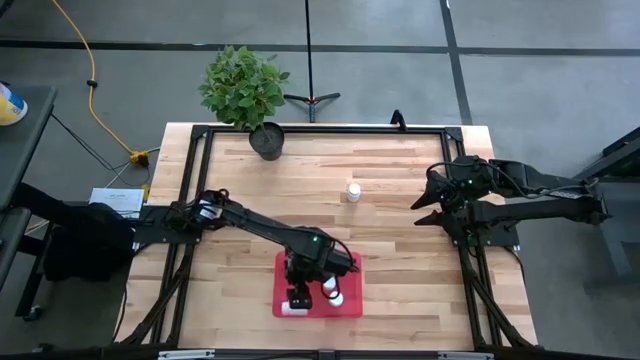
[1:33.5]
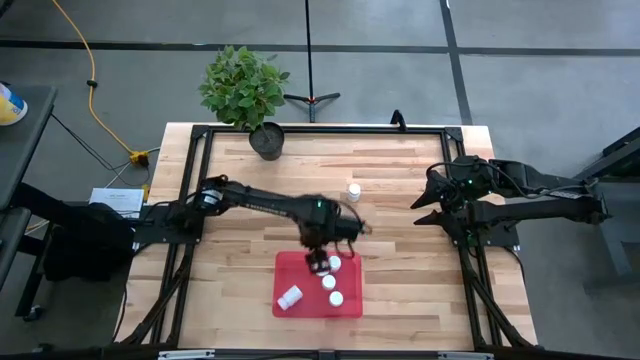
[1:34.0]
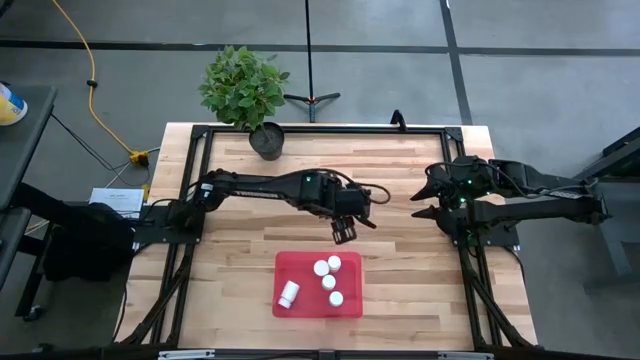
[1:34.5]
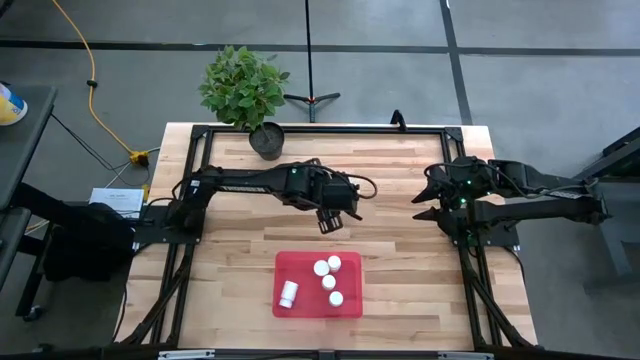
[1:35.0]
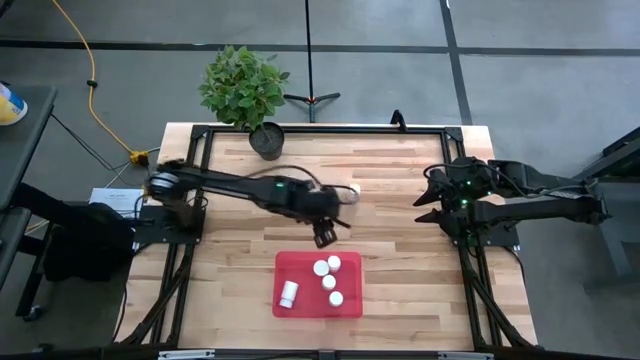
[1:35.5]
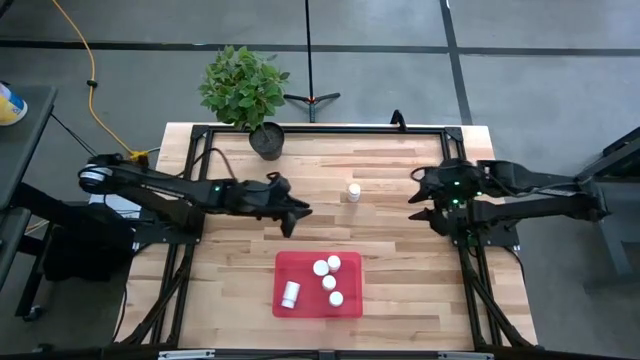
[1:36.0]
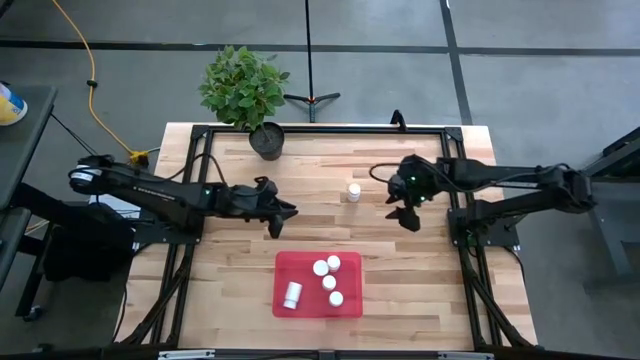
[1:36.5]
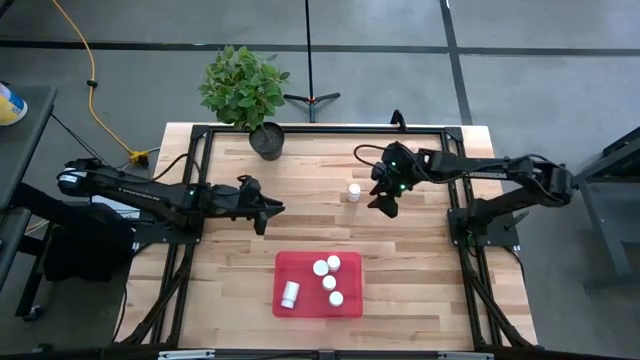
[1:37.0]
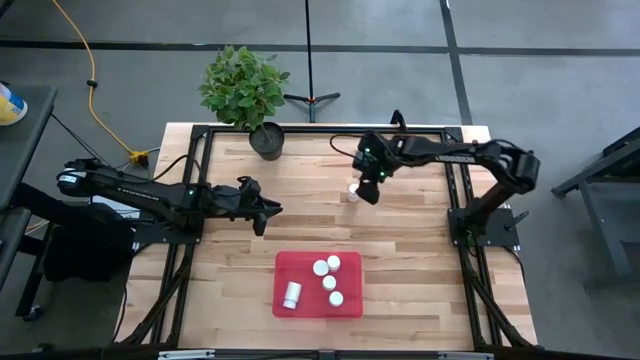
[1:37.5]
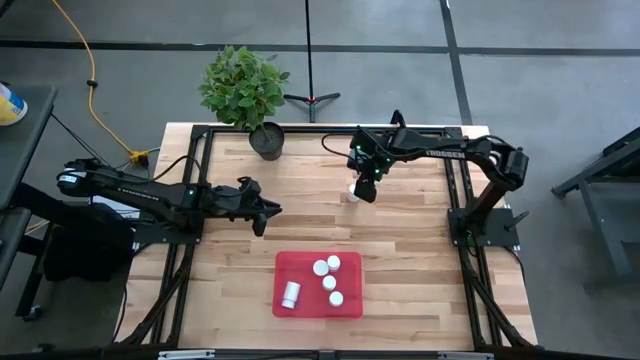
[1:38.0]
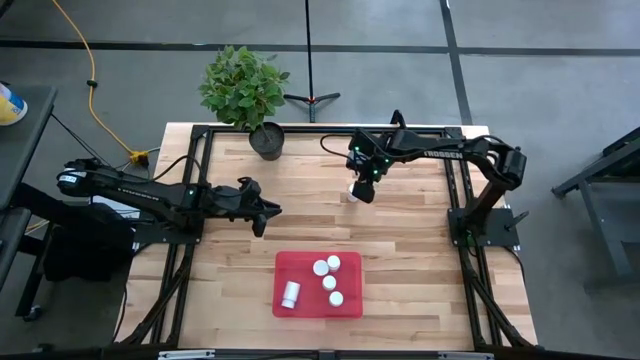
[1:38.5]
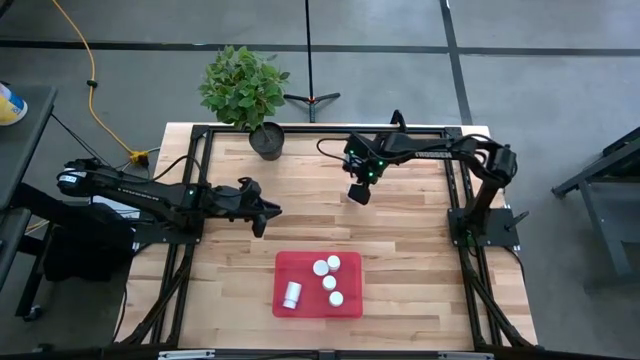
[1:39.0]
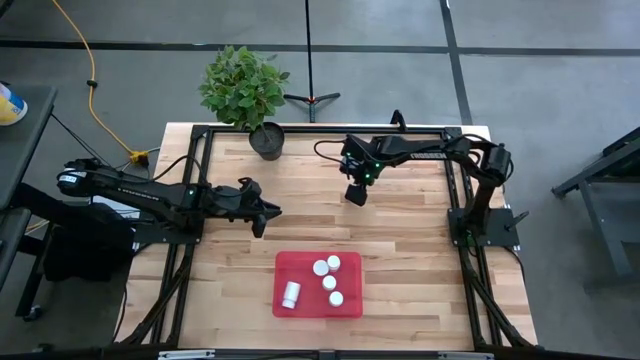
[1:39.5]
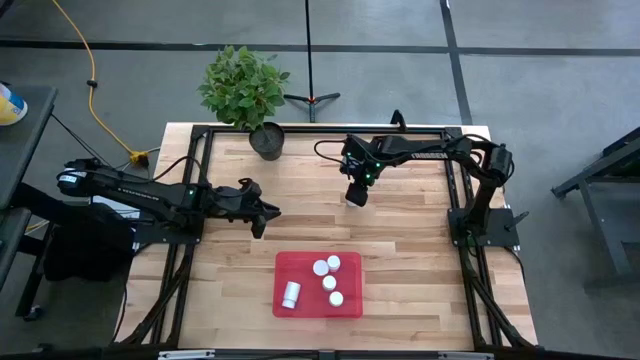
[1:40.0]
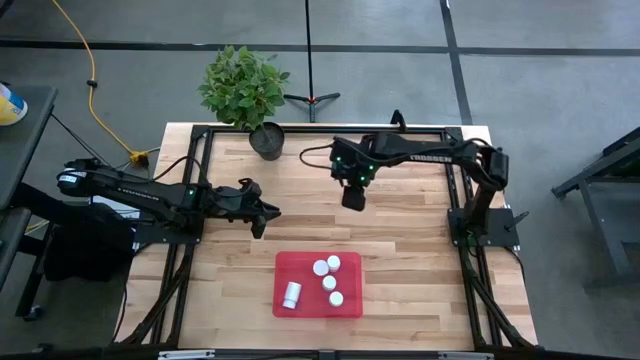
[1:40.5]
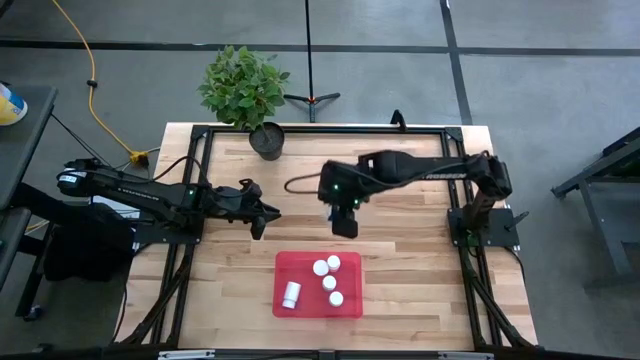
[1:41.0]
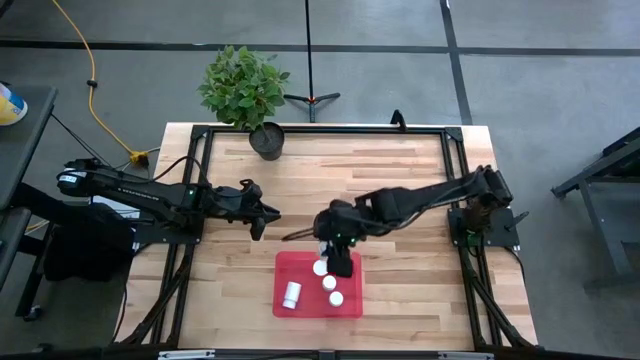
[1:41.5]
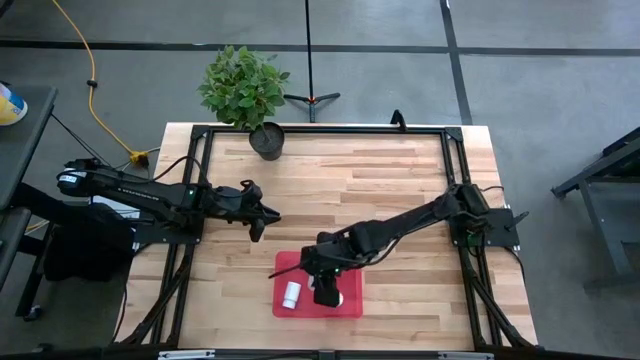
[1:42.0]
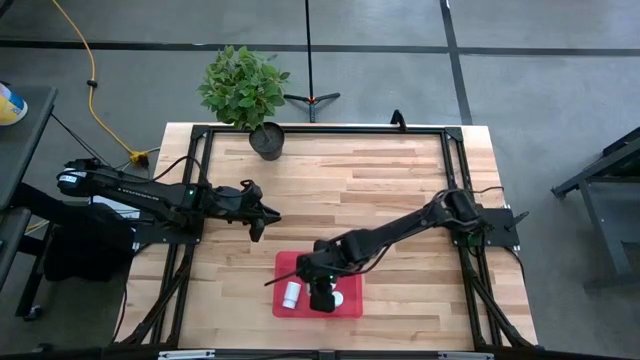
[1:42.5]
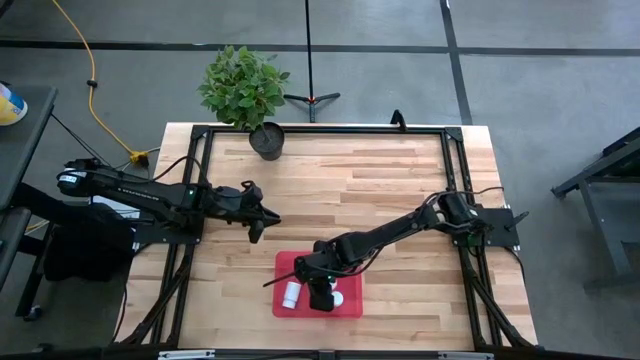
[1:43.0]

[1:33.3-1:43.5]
Task: Pick and place pill bottles into a basket
Put the white pill bottle into the red bin

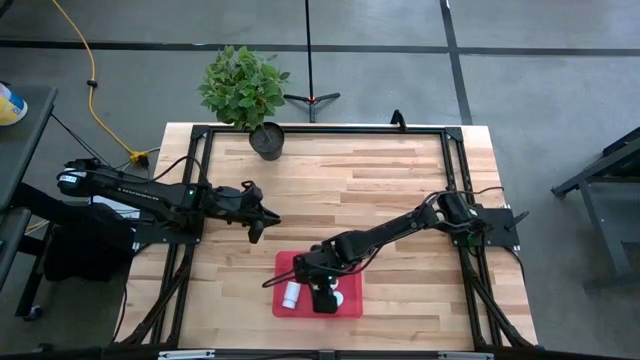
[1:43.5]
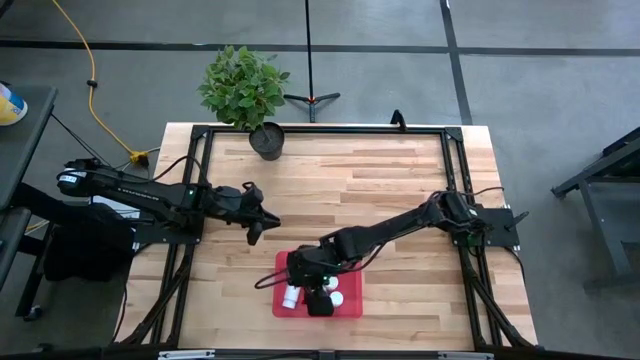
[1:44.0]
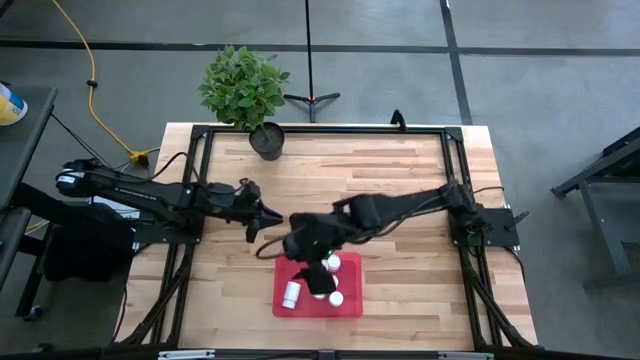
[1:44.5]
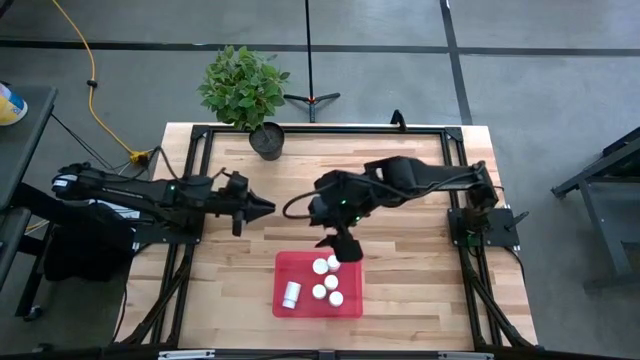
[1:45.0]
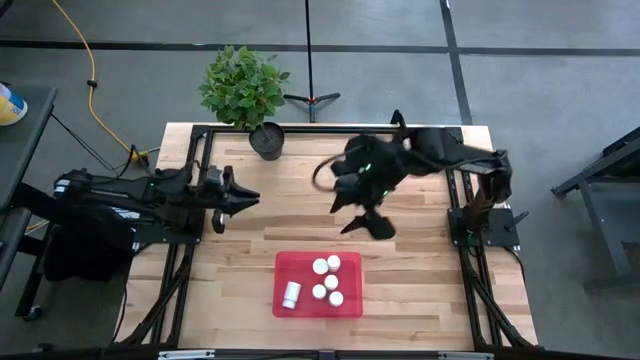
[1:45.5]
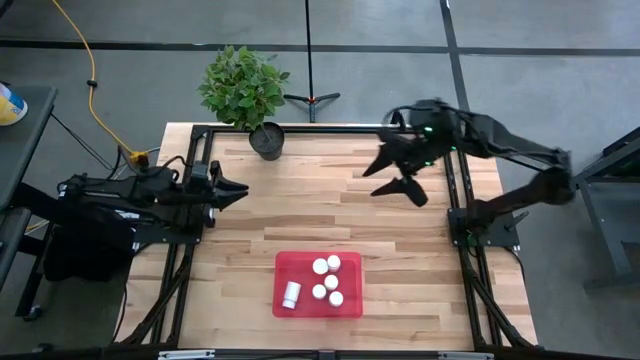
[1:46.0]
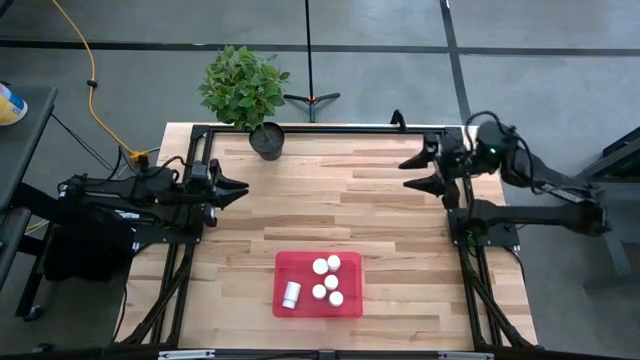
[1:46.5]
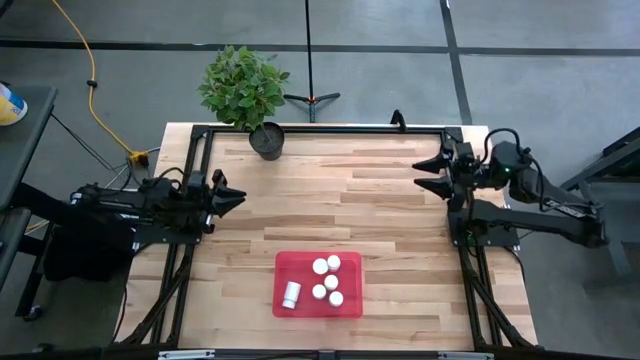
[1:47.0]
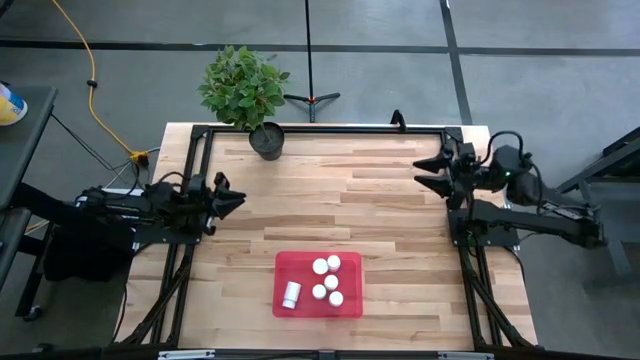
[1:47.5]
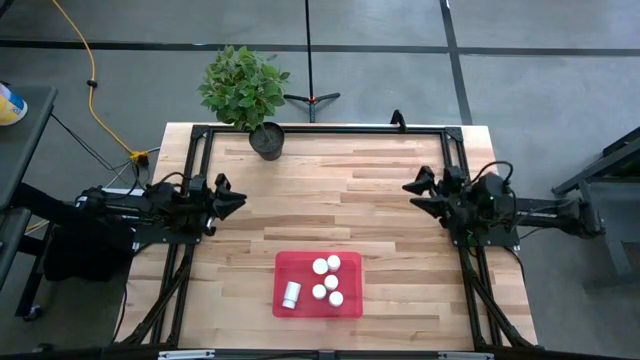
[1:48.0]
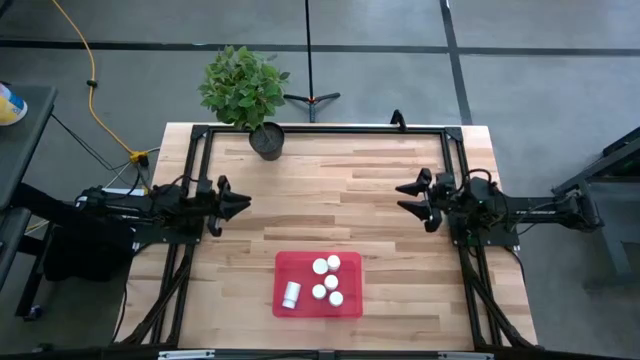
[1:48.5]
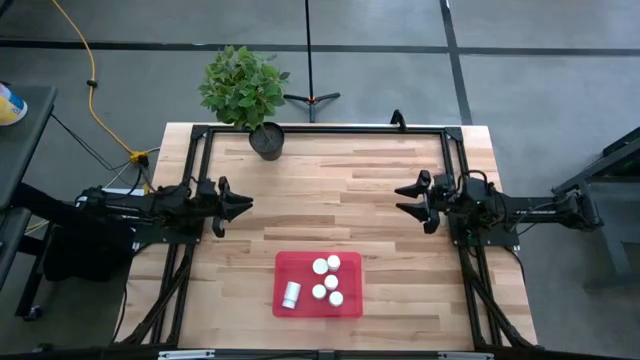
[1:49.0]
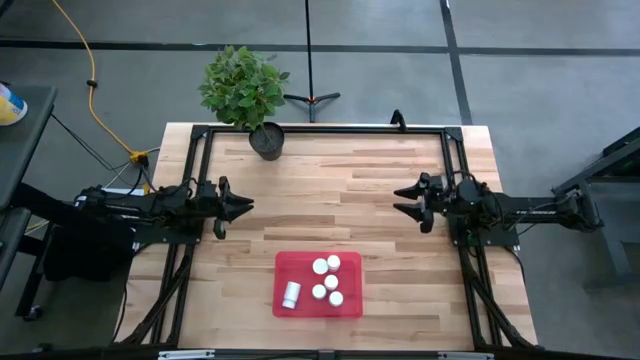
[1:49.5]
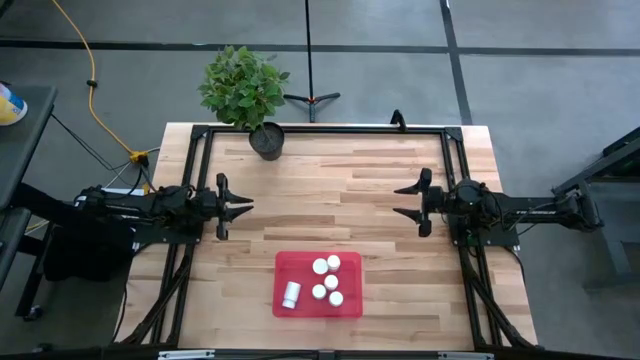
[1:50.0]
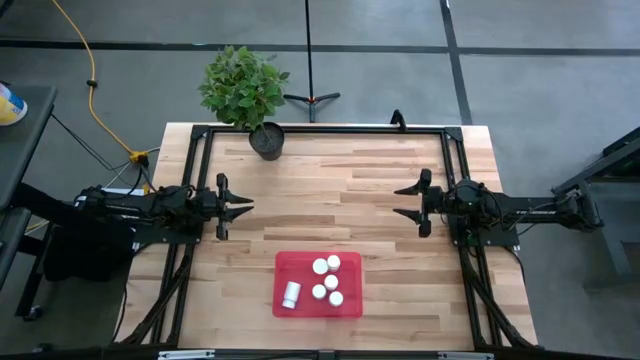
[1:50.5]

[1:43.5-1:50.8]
Return to Home Position

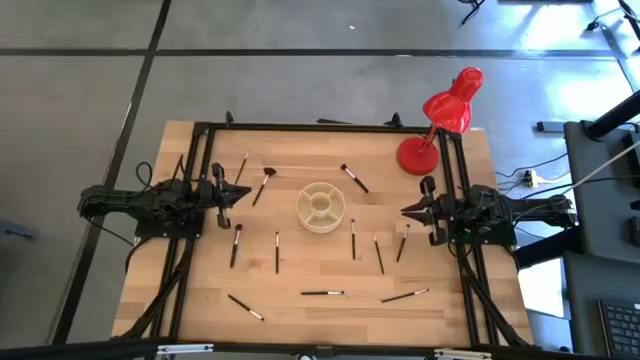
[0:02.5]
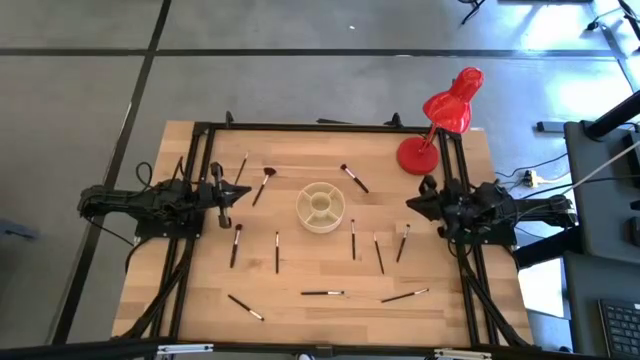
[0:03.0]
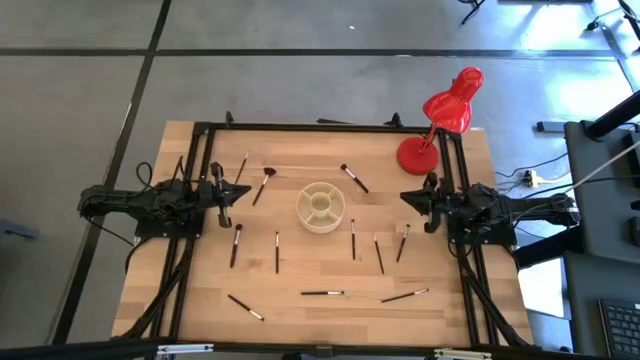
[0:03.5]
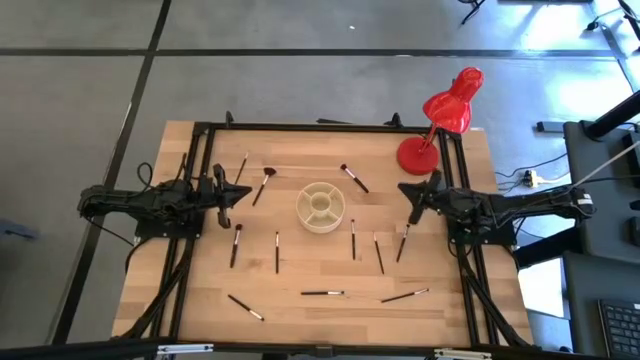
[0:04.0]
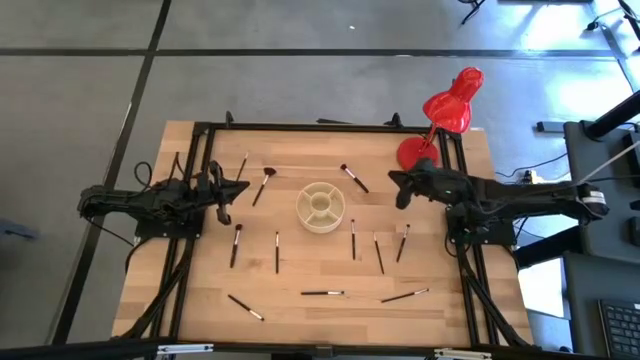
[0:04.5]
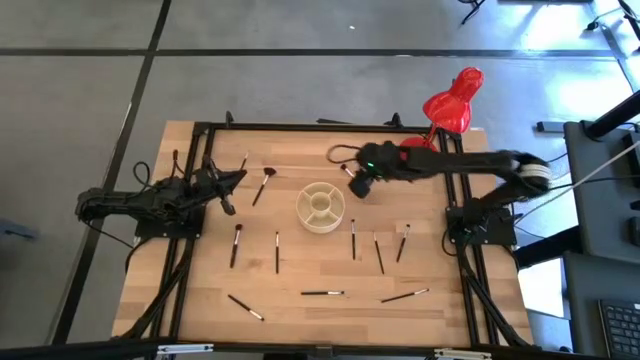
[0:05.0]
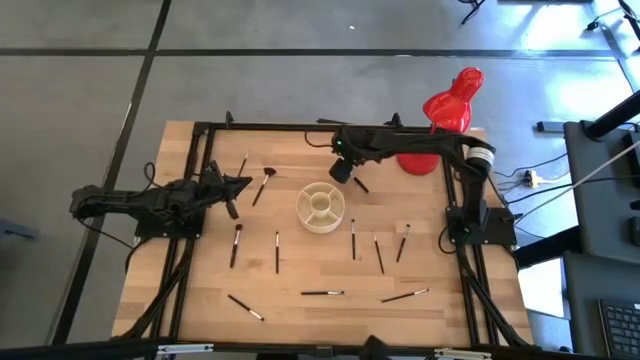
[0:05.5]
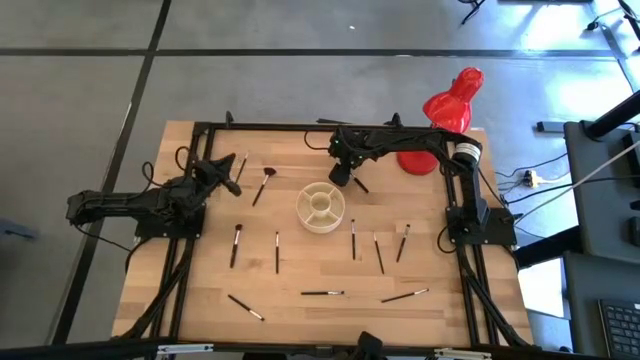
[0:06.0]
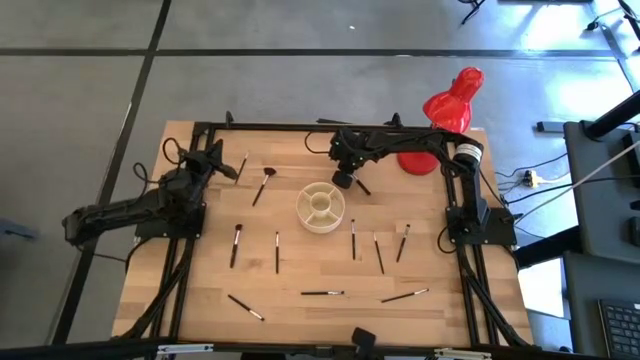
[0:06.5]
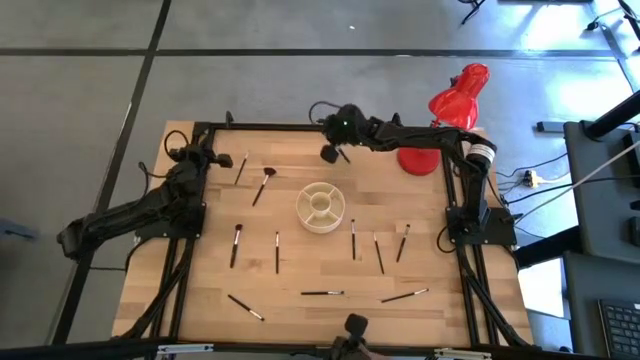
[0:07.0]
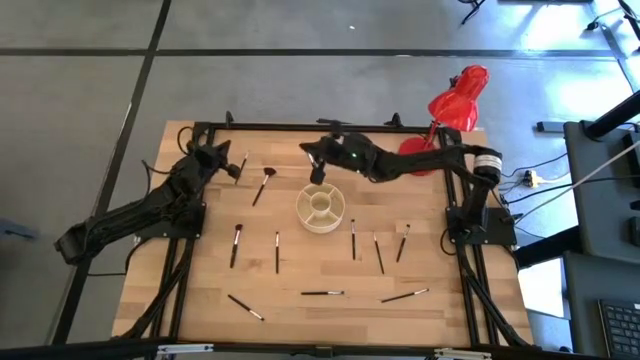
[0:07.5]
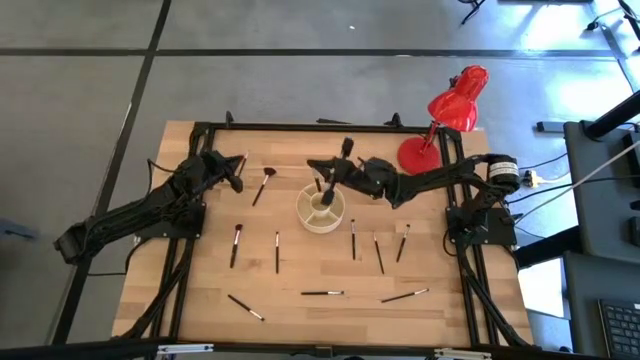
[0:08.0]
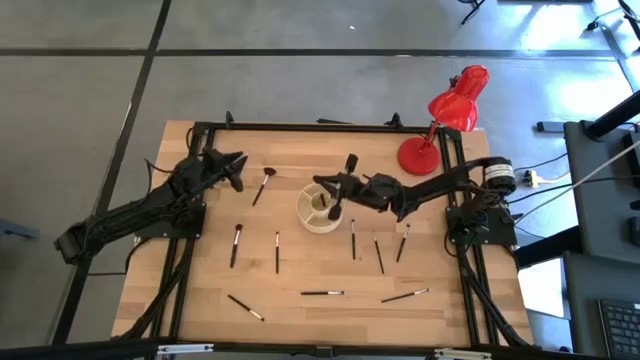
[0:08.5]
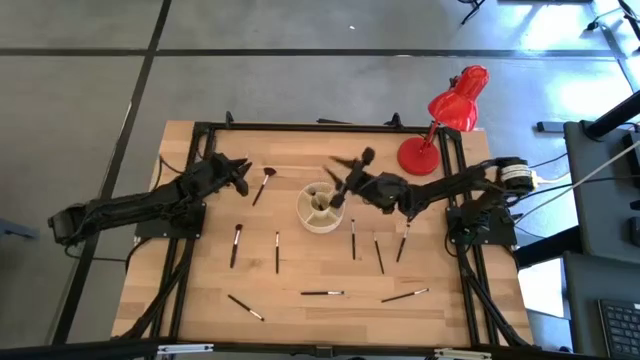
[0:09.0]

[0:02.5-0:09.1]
Task: Put items in baskets/containers
Put the blush brush into the white organizer
